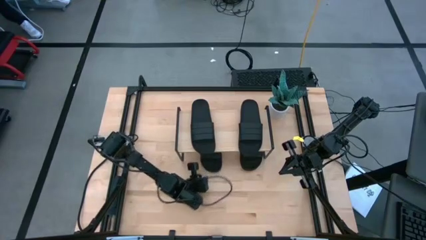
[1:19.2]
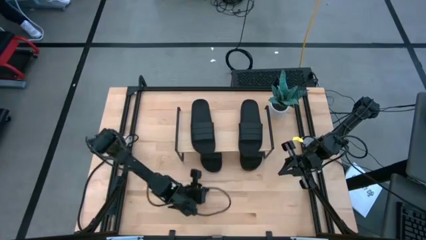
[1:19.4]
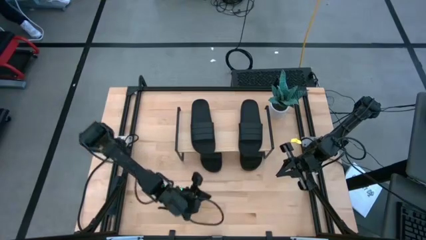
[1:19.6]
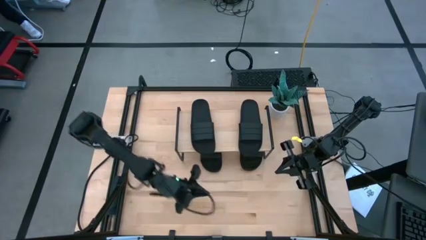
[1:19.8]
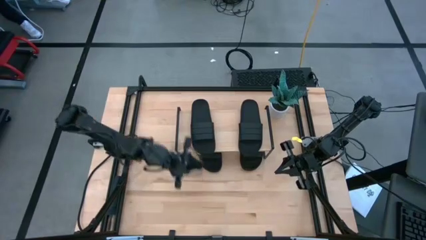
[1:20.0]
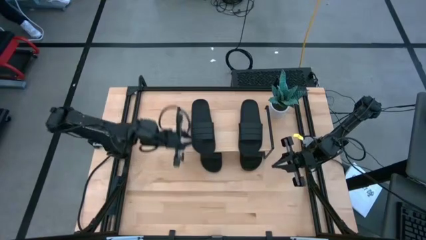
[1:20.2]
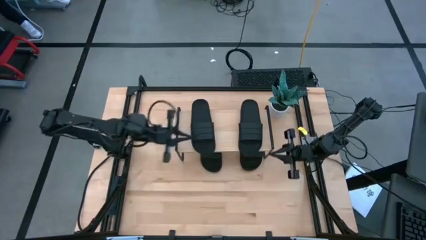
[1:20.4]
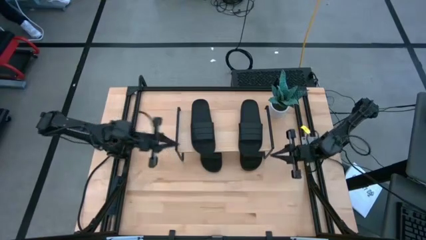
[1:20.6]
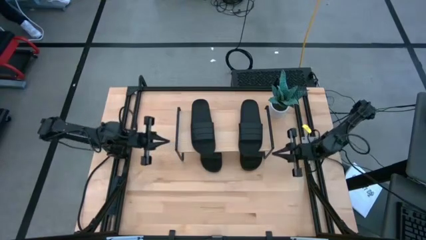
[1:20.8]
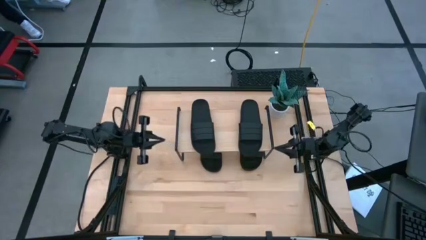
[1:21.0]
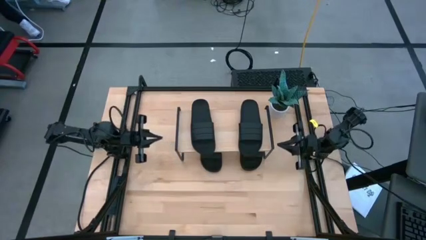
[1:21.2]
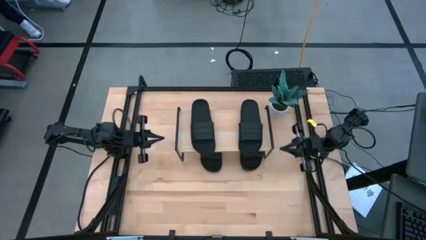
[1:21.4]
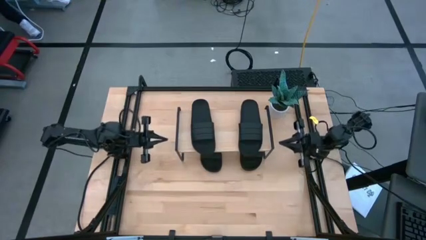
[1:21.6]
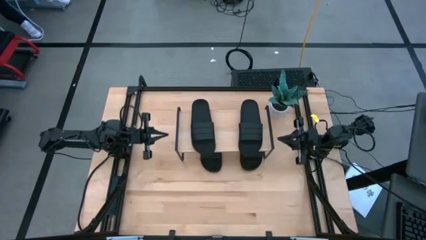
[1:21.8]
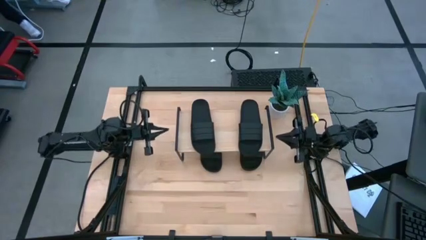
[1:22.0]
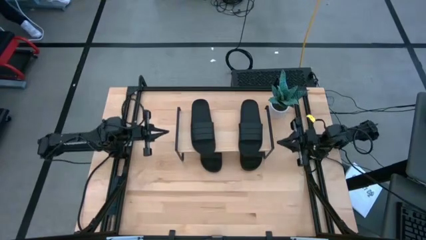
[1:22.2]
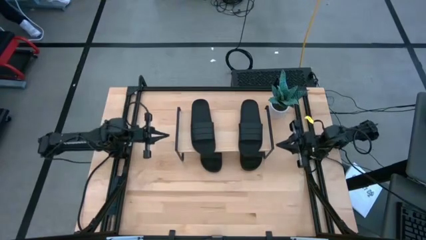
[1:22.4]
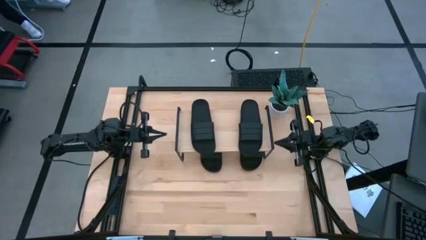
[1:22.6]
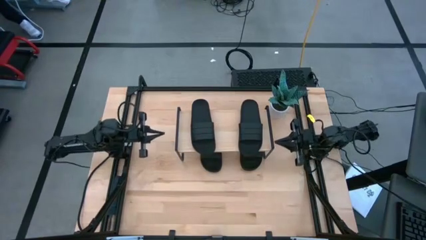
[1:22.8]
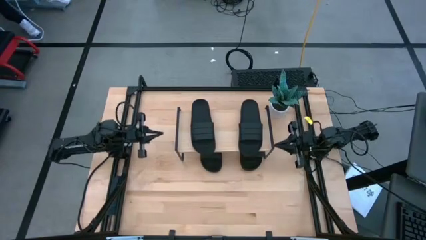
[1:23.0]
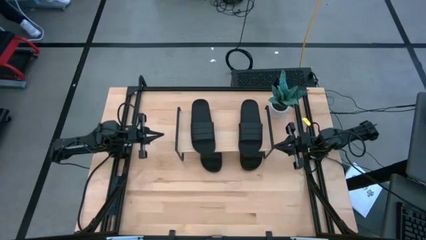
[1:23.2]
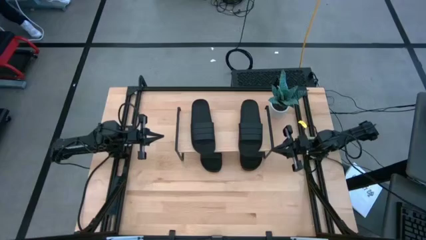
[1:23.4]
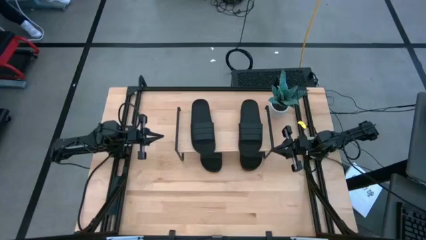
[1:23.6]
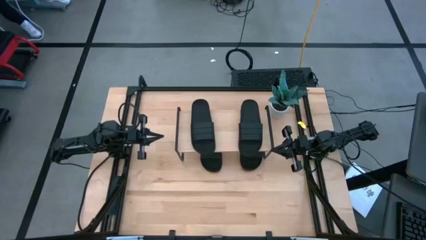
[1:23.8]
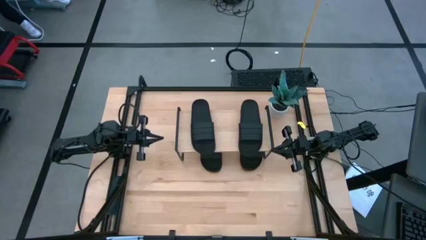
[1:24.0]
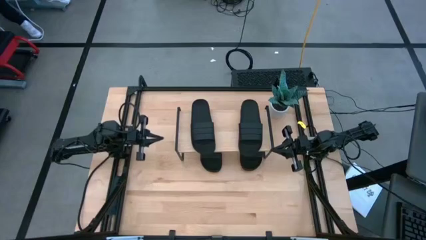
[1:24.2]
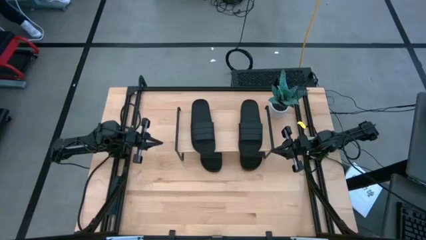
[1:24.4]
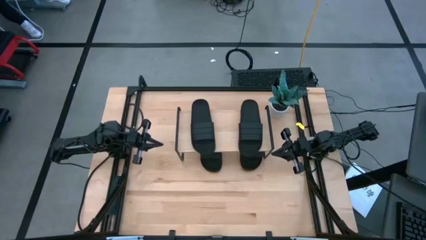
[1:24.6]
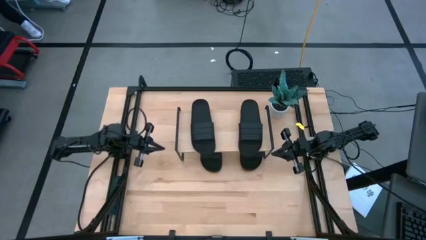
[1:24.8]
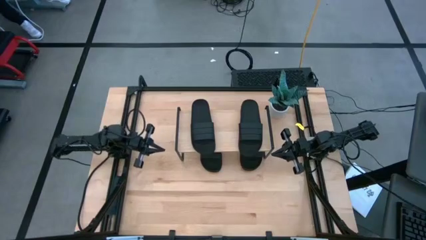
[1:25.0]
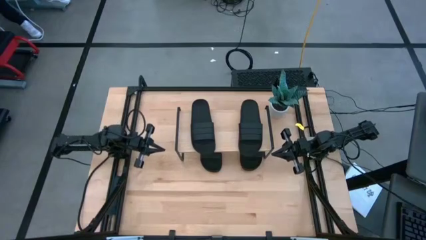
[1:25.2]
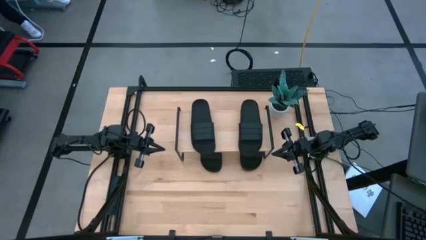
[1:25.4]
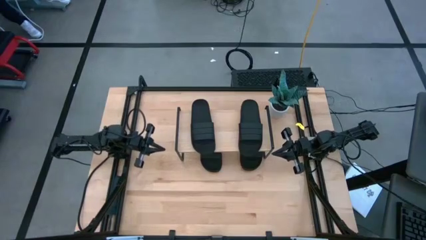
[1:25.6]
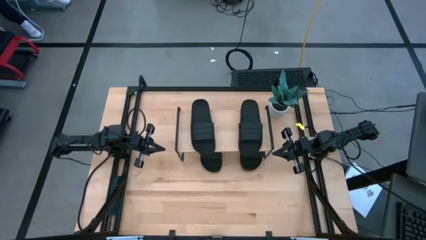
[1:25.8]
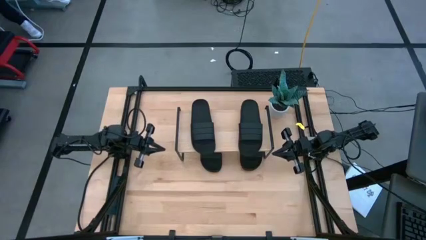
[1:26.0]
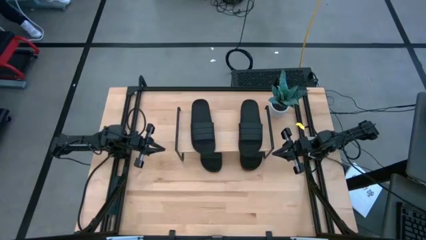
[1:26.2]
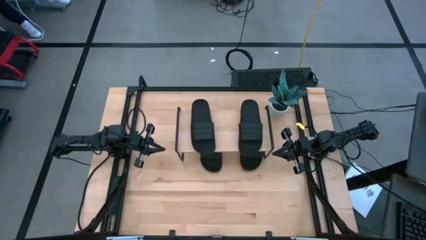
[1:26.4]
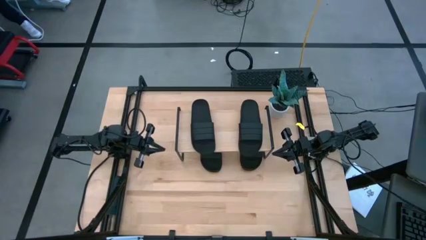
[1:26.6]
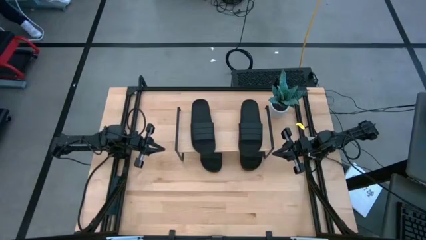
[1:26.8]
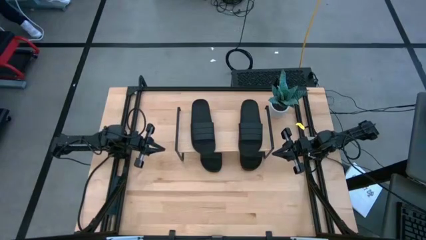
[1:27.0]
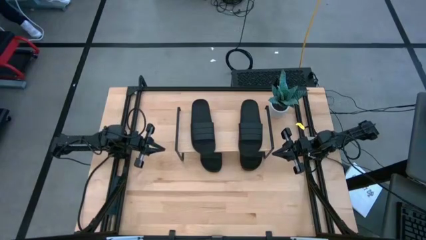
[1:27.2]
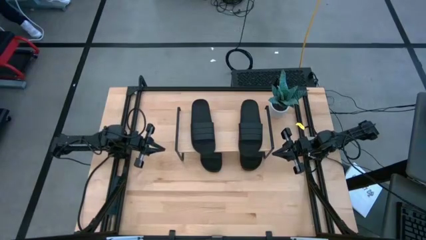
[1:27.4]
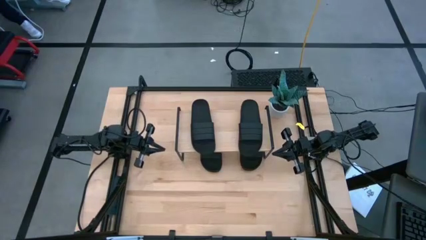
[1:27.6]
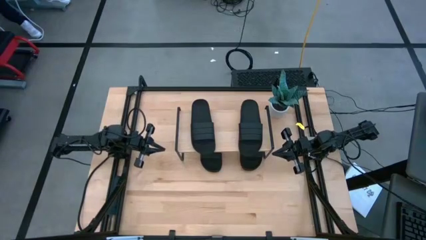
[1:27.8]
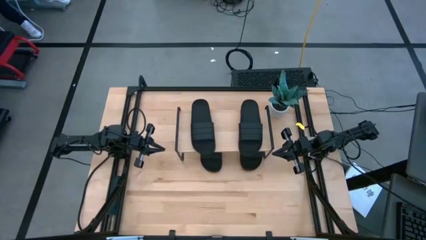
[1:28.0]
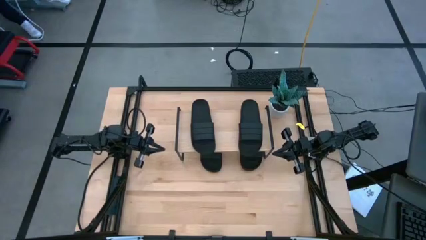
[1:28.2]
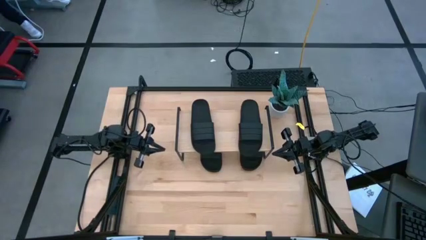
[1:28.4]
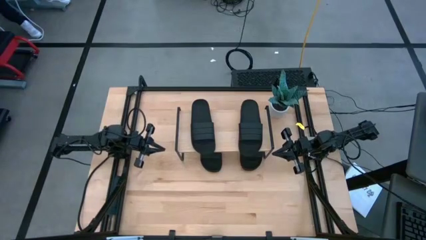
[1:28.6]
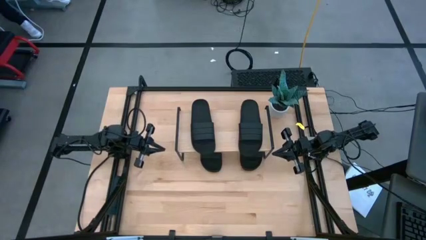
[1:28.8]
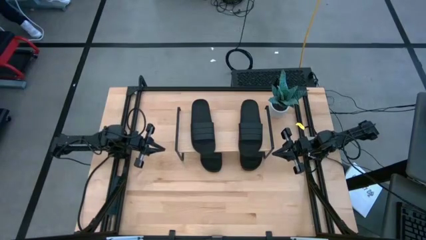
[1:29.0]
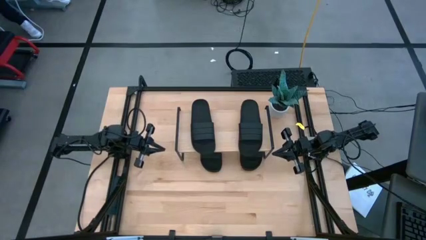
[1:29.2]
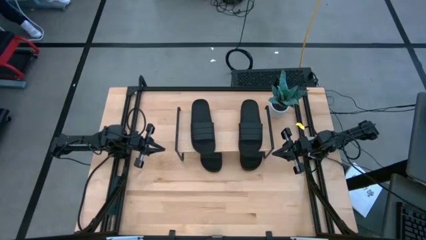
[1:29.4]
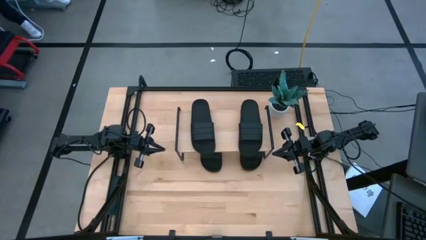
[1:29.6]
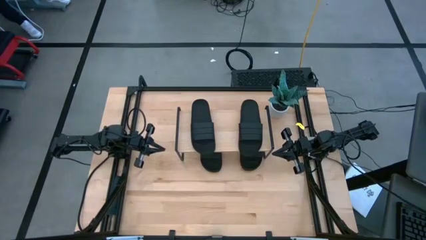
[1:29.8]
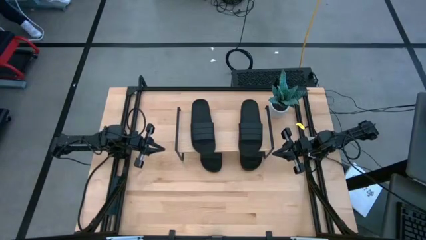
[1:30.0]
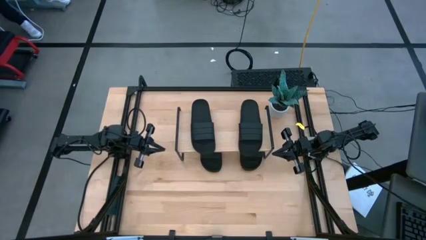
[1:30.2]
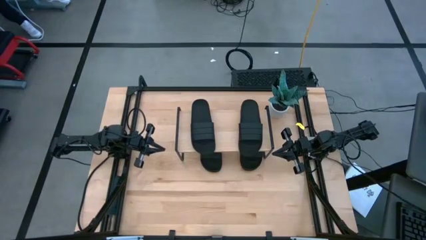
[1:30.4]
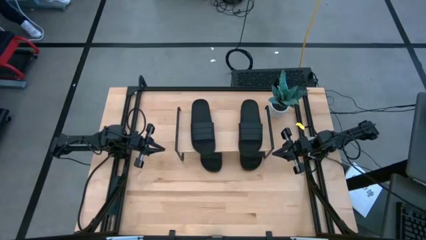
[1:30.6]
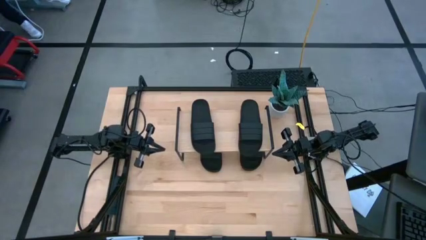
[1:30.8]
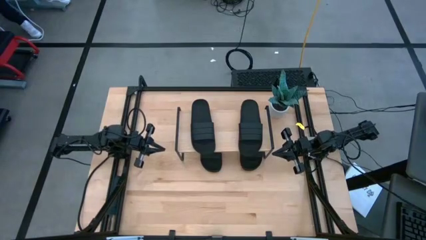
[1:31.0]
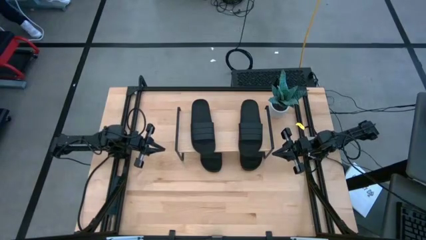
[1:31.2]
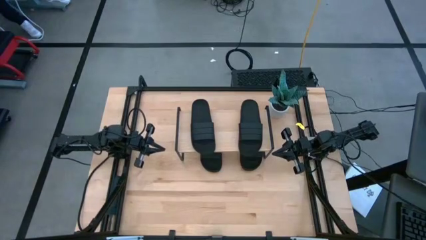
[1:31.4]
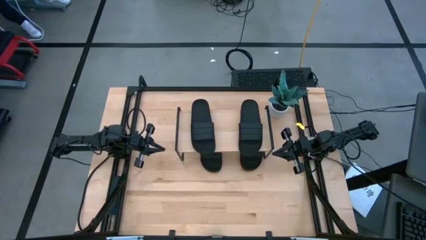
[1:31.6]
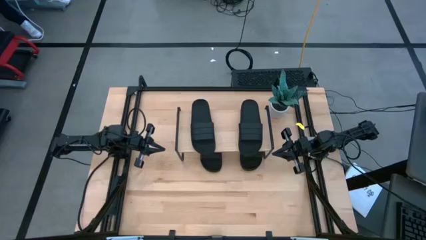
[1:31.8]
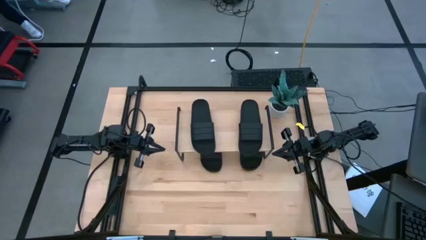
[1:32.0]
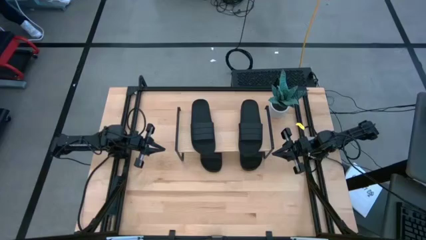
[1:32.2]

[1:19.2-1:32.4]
Task: Pick and place slides into the shelf
Return to Home Position
